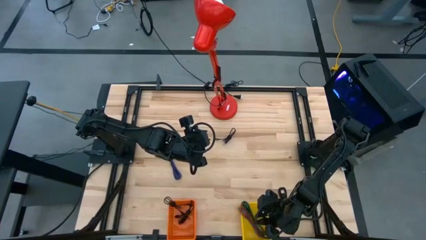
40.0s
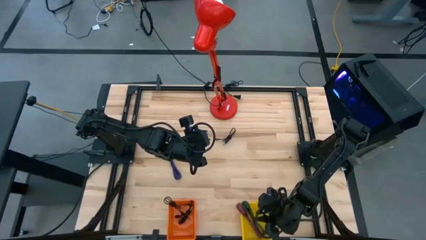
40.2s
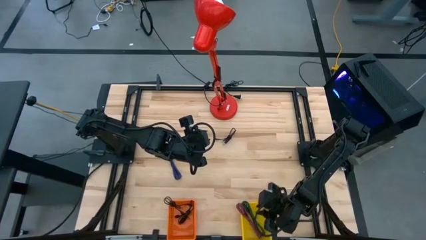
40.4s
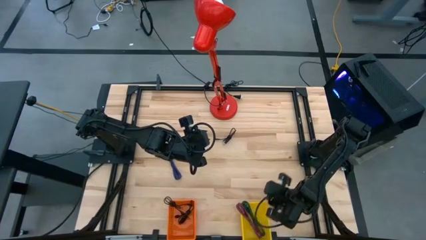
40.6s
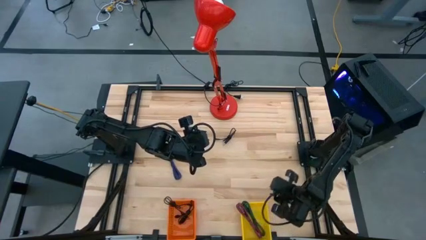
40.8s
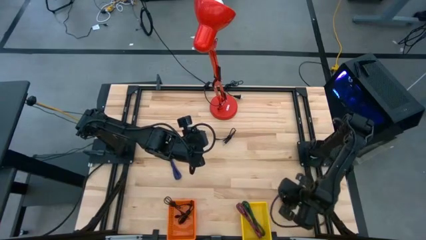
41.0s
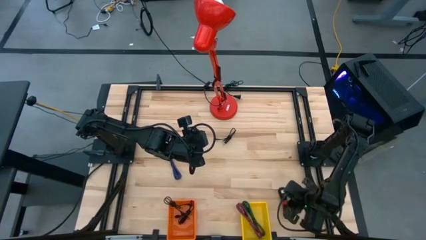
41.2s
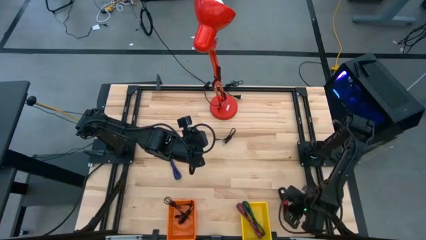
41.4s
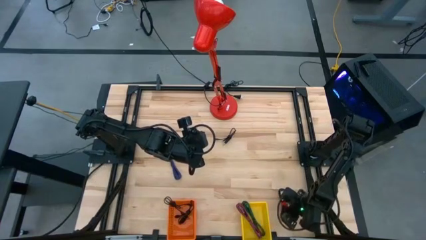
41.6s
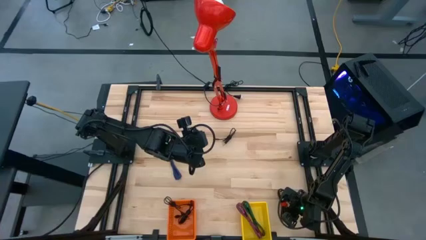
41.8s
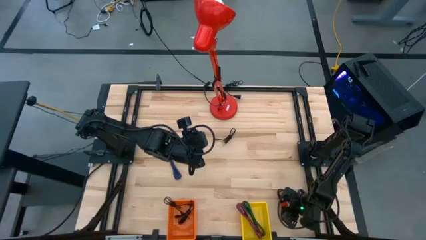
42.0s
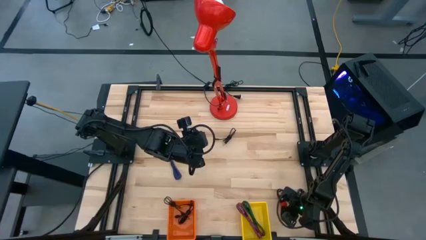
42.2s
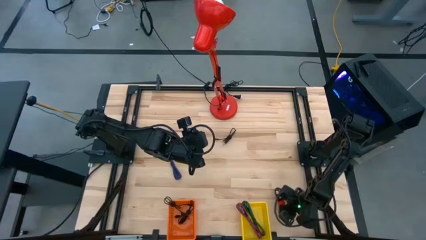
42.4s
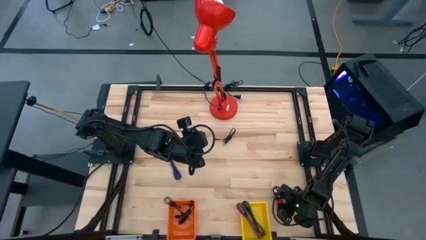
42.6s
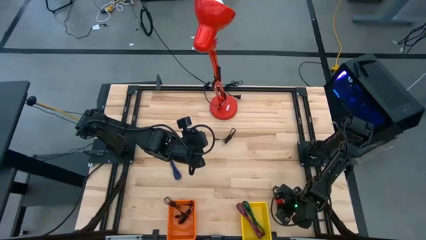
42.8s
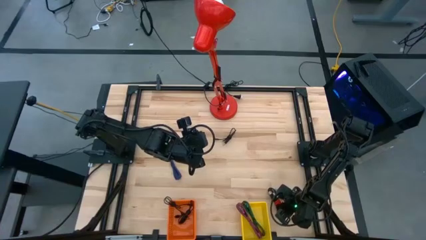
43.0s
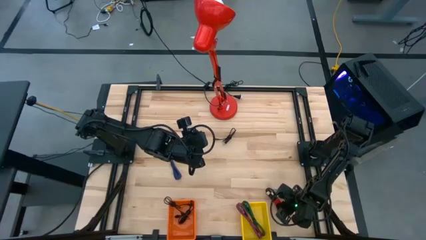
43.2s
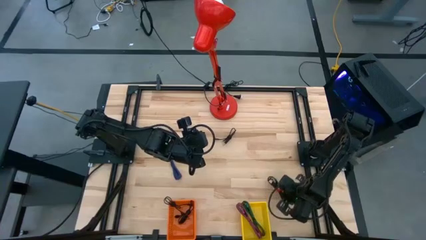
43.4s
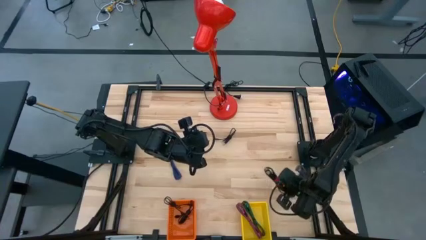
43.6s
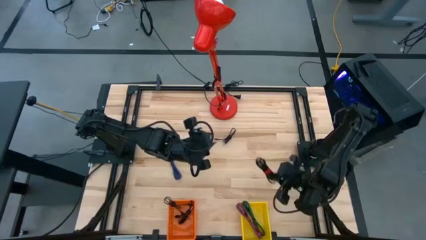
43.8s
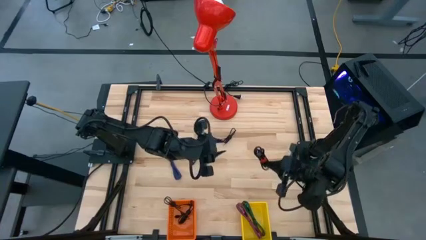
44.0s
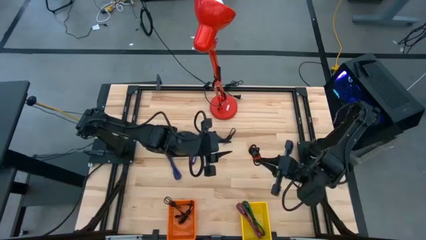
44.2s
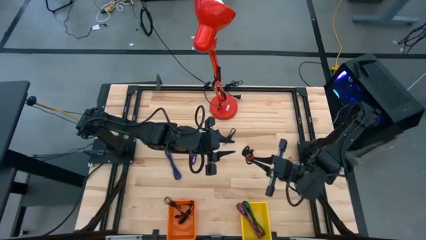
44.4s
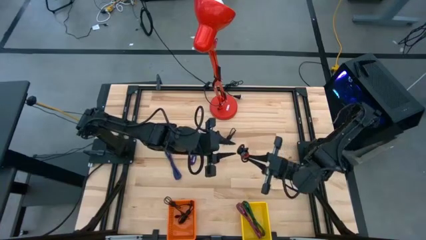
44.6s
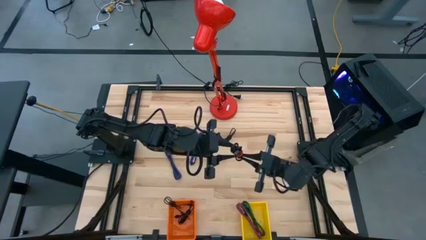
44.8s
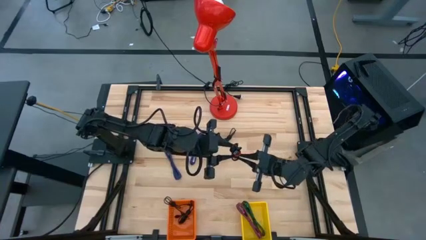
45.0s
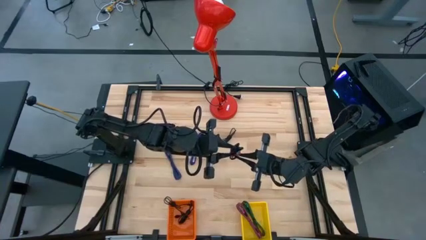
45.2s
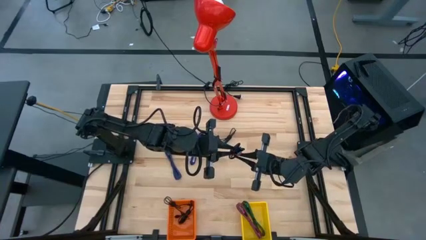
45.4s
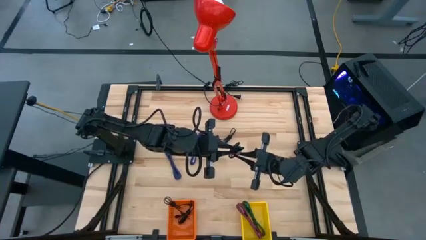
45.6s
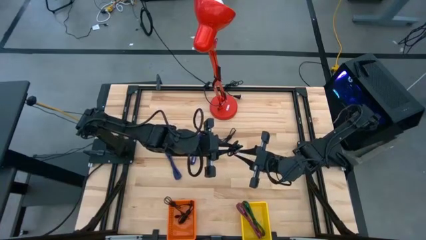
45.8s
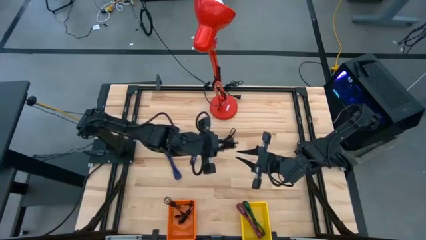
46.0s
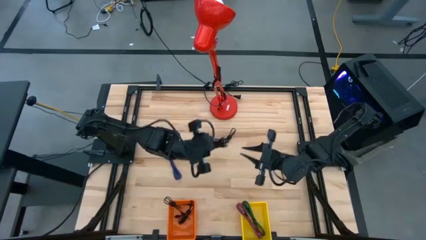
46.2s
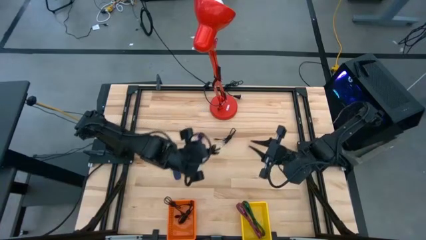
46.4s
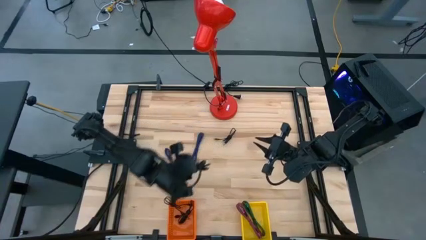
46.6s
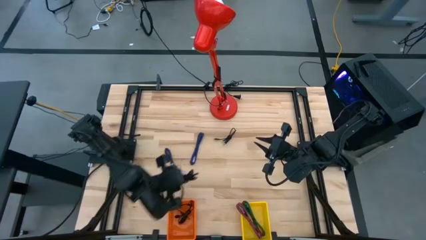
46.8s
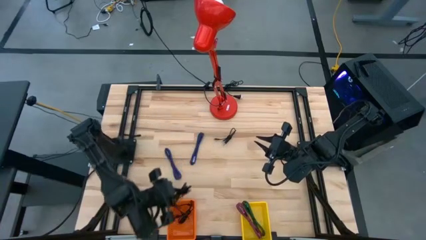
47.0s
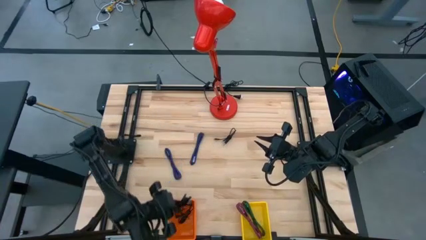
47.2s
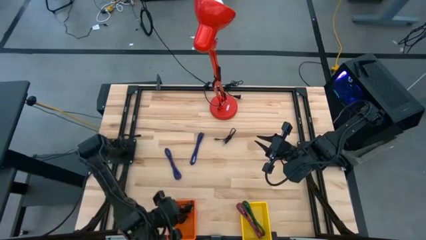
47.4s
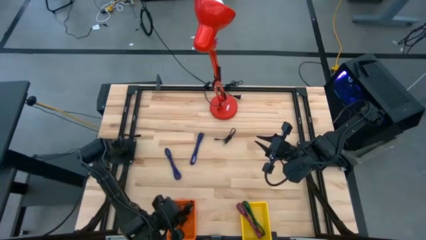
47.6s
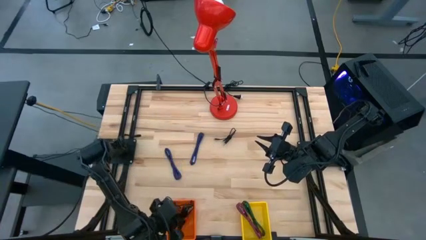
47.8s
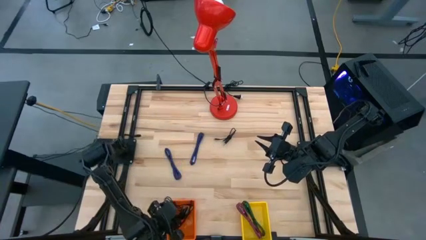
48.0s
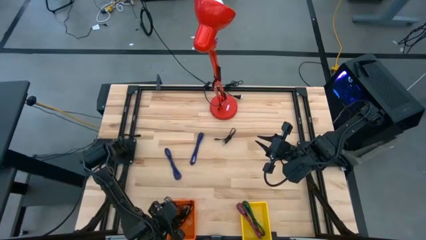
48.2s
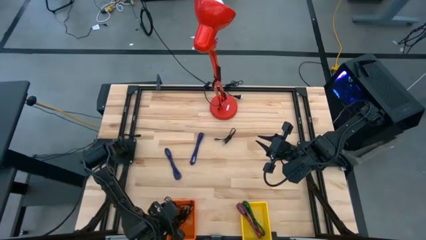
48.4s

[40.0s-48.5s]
Task: Pick & Place USB Port
Put the black charger cable into the orange bin

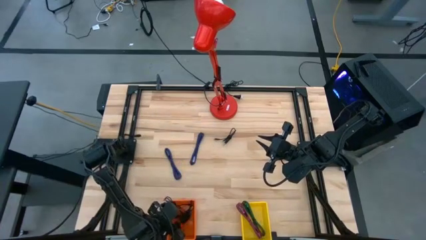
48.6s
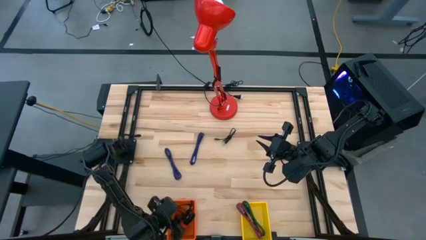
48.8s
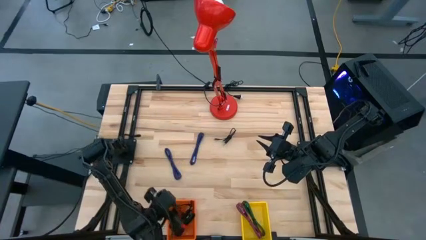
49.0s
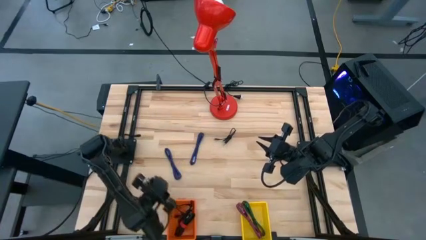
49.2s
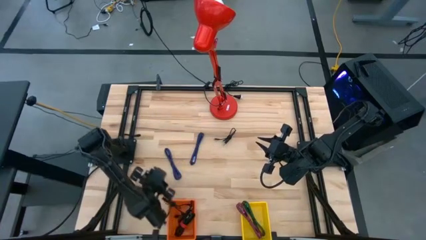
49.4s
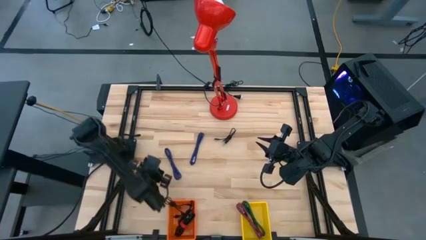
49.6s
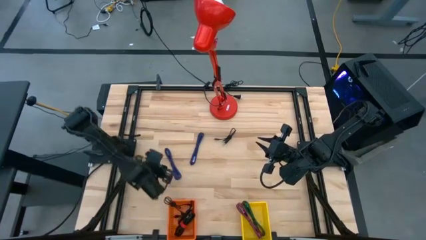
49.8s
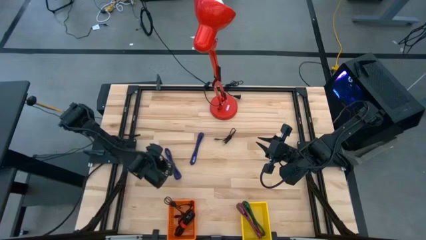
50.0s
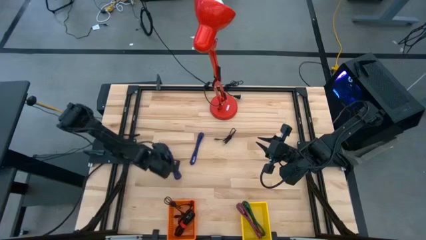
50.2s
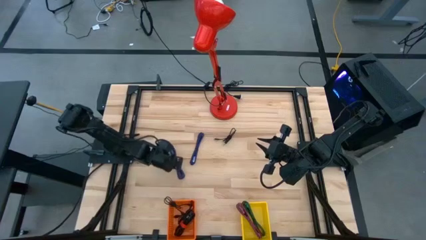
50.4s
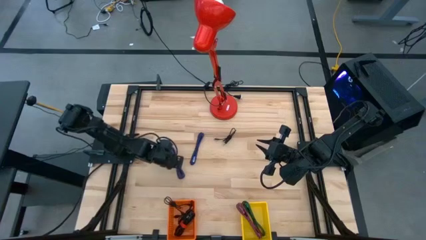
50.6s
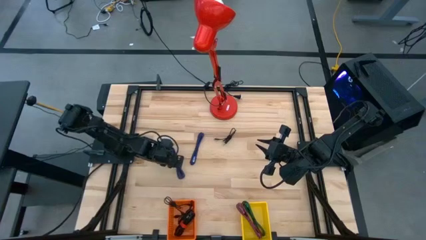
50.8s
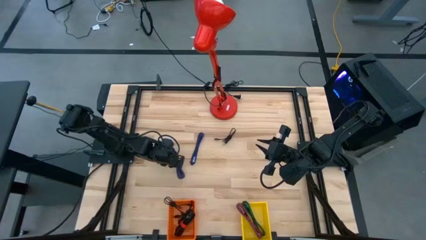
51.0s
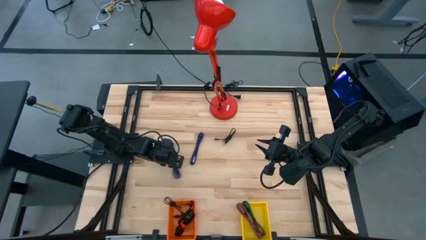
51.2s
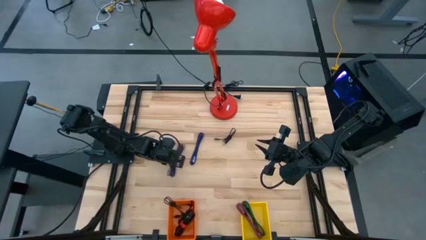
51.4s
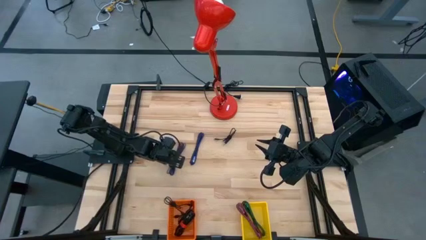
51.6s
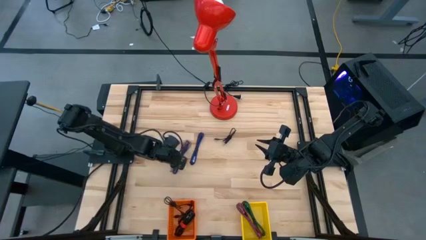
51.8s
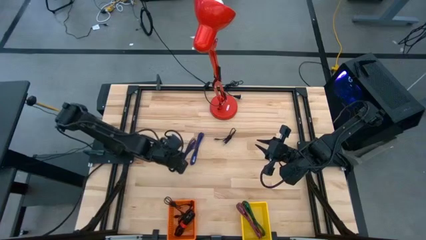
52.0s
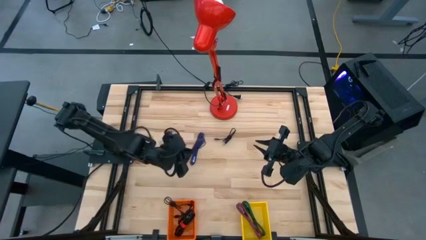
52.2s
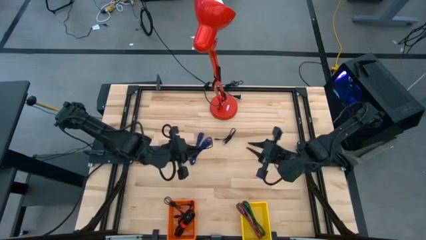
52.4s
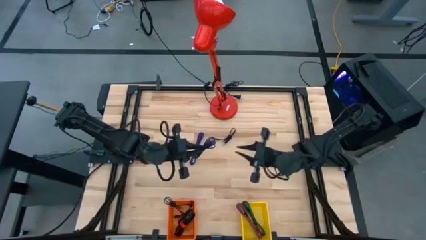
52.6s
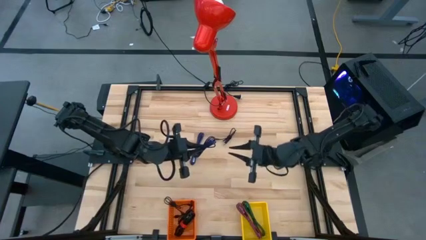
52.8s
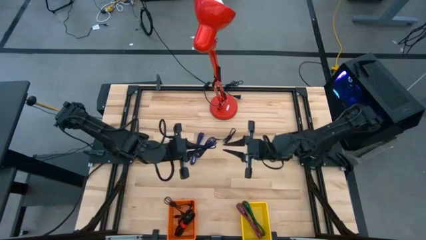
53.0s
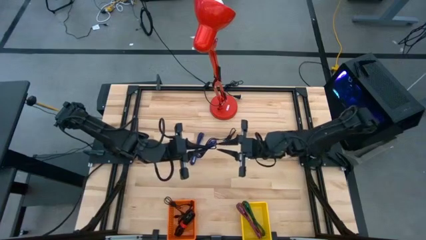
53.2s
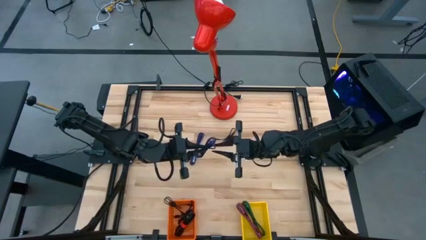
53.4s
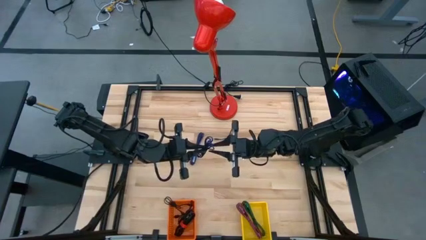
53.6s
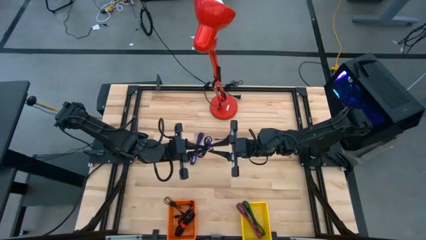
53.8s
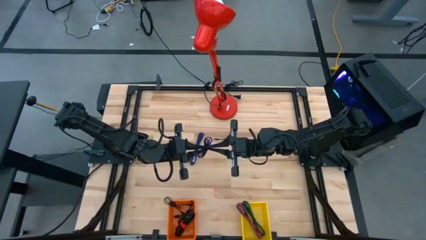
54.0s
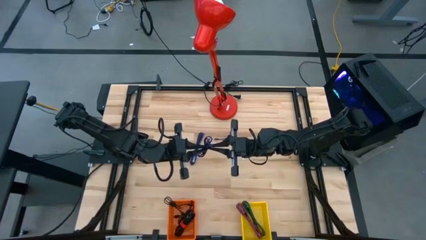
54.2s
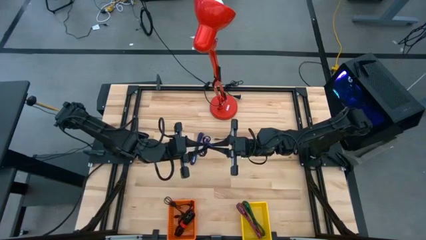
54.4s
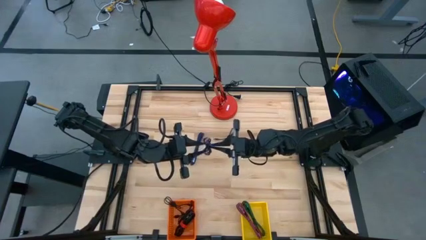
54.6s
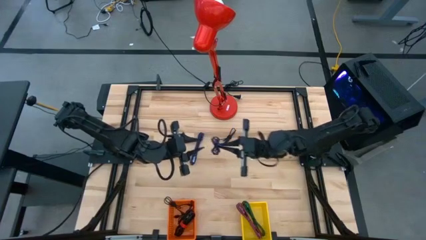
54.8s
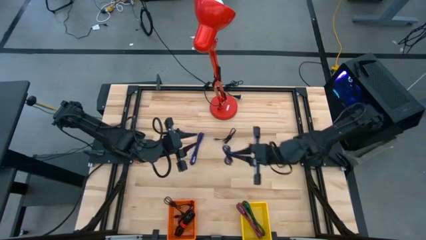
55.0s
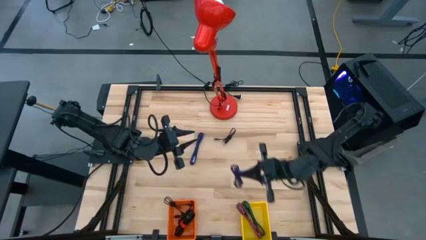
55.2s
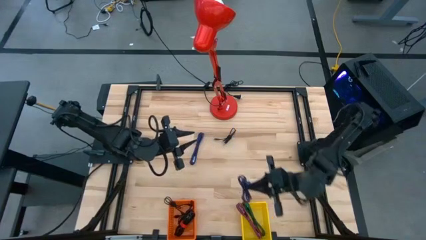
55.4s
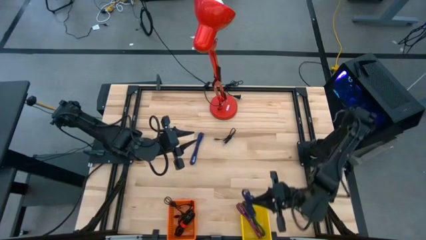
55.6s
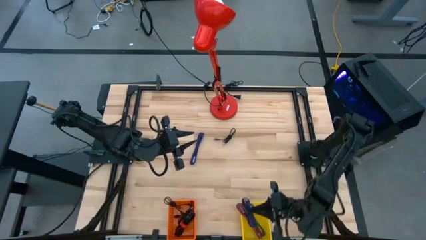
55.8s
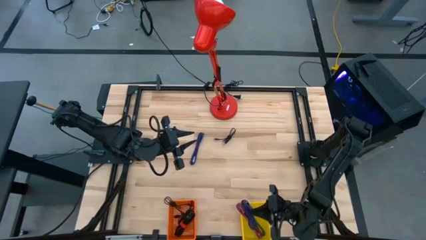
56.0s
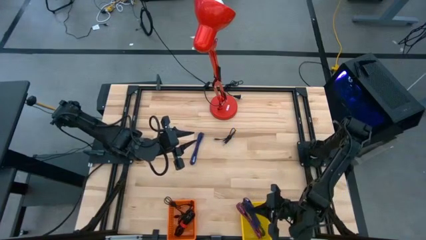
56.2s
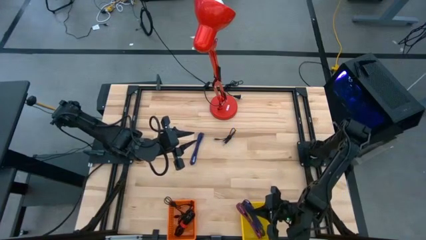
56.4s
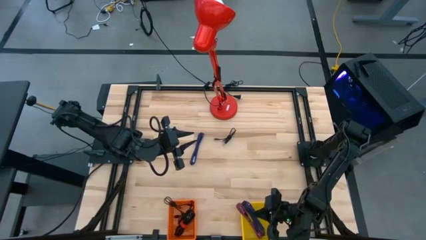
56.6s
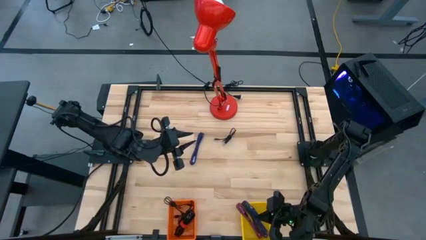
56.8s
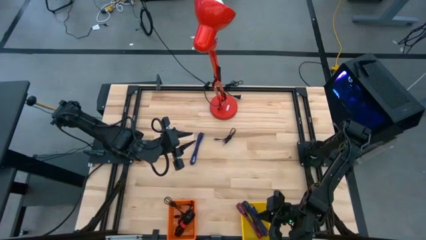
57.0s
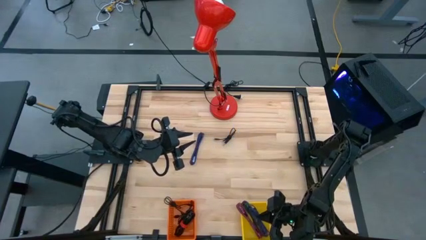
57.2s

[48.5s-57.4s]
Put the blue charger cable into the yellow bin
